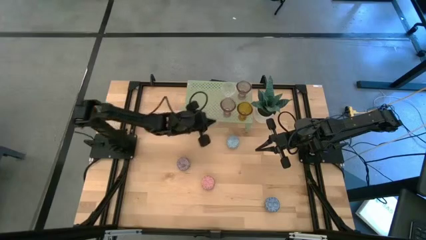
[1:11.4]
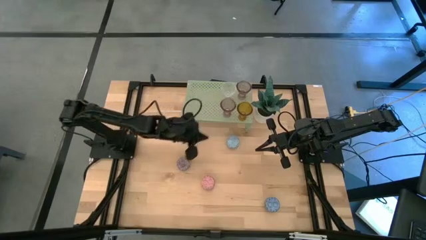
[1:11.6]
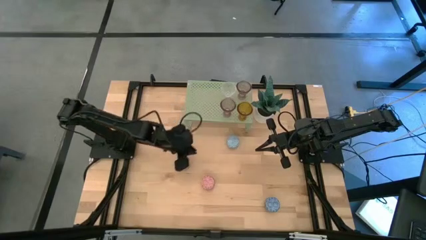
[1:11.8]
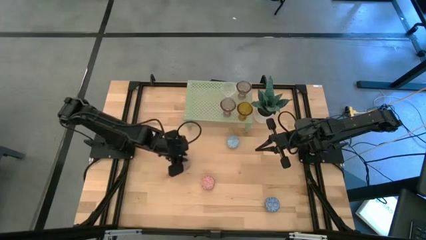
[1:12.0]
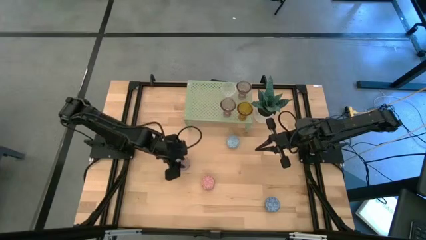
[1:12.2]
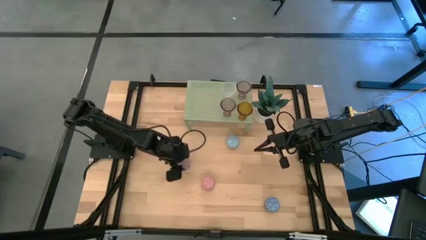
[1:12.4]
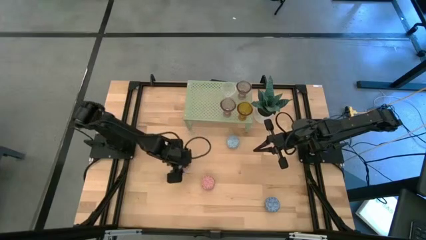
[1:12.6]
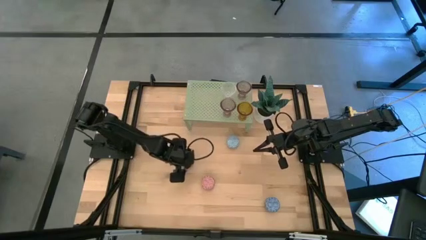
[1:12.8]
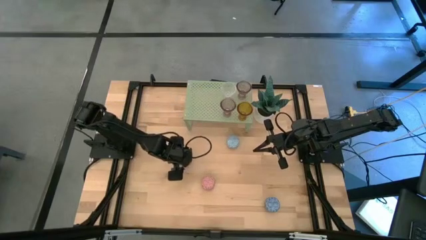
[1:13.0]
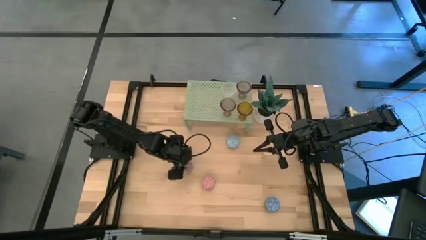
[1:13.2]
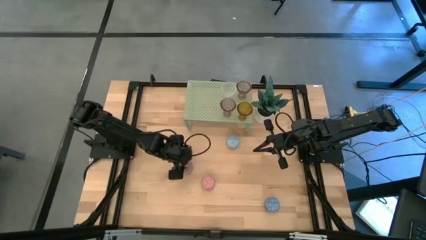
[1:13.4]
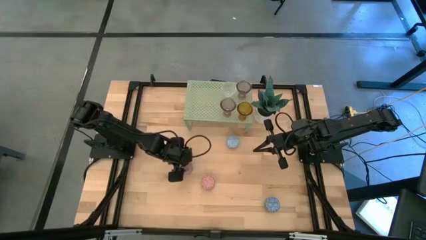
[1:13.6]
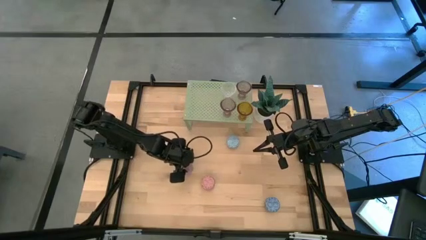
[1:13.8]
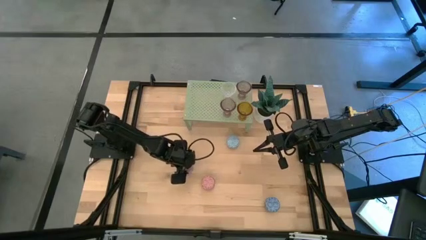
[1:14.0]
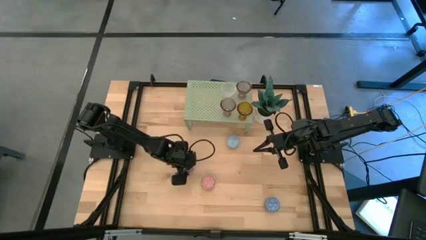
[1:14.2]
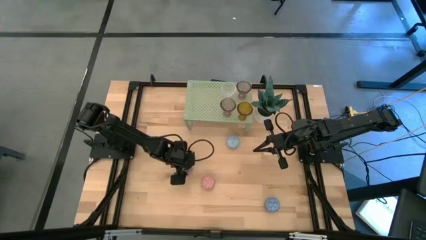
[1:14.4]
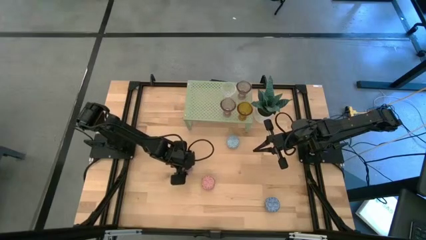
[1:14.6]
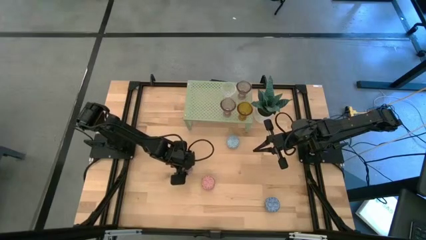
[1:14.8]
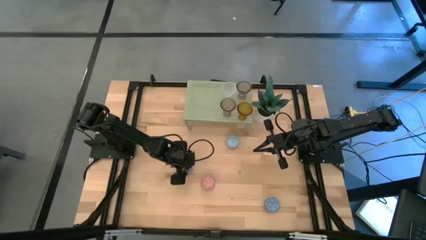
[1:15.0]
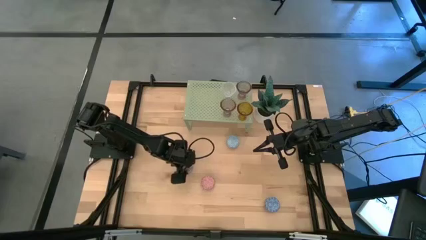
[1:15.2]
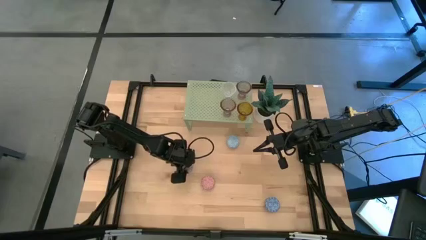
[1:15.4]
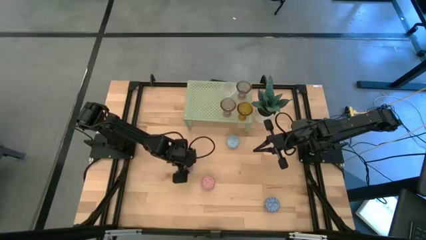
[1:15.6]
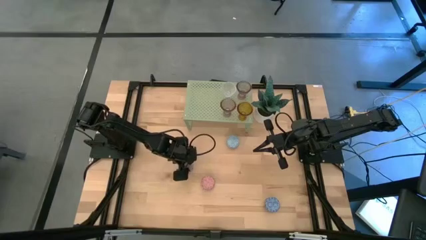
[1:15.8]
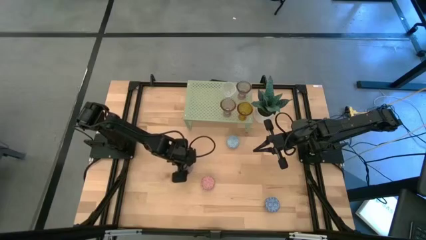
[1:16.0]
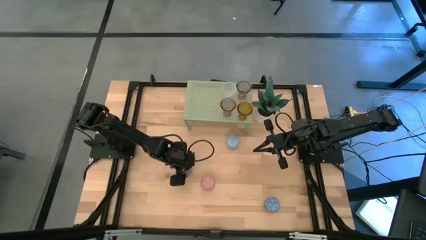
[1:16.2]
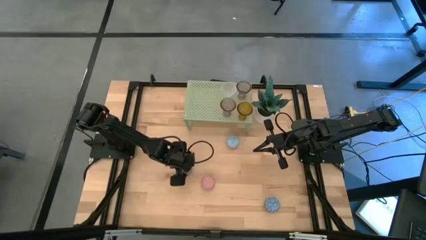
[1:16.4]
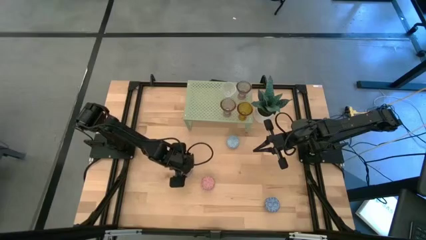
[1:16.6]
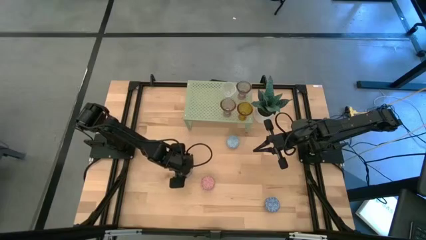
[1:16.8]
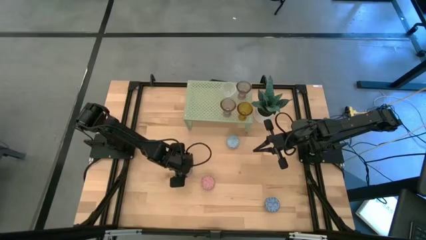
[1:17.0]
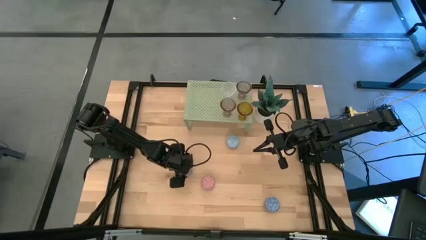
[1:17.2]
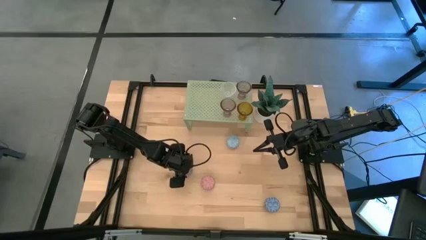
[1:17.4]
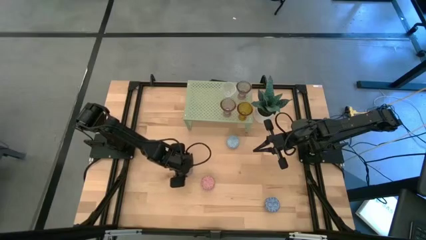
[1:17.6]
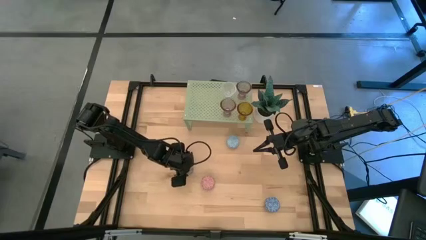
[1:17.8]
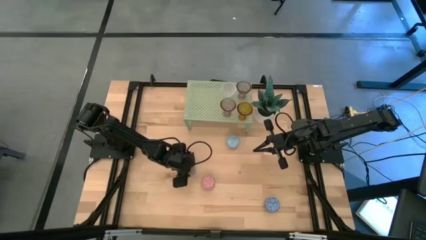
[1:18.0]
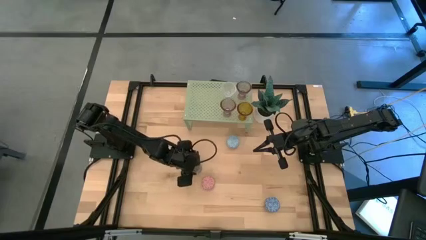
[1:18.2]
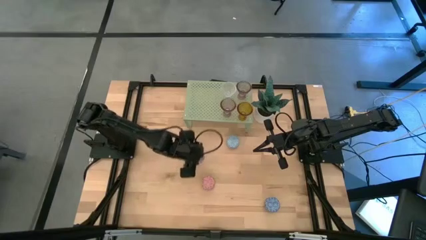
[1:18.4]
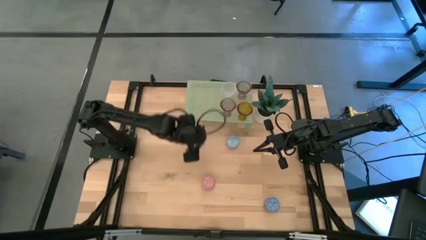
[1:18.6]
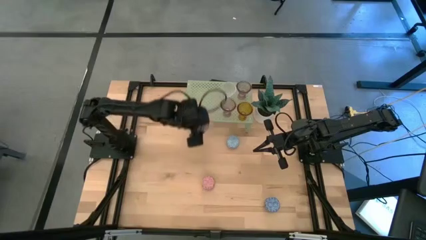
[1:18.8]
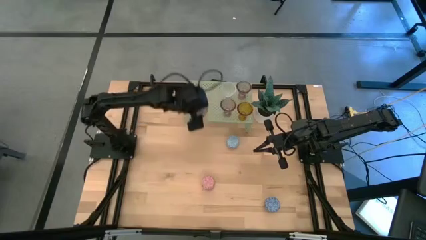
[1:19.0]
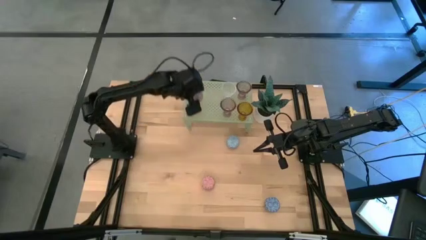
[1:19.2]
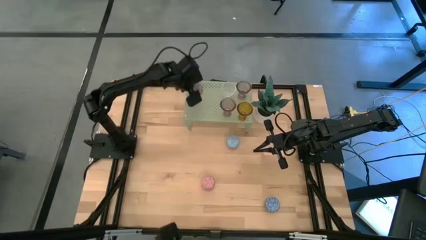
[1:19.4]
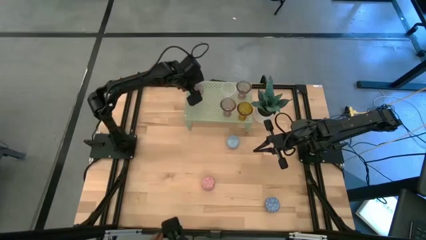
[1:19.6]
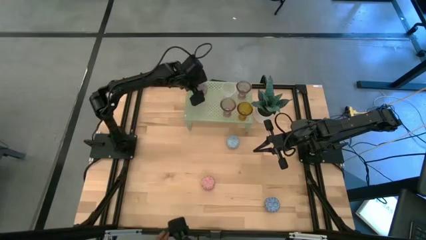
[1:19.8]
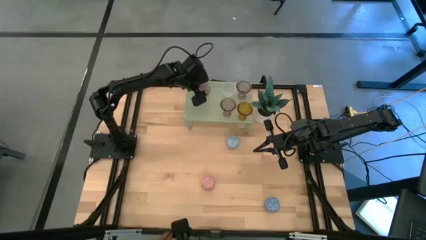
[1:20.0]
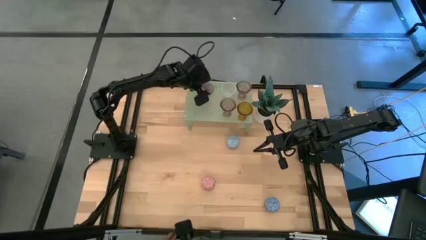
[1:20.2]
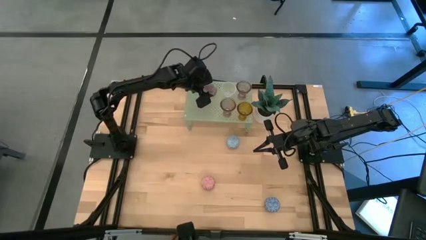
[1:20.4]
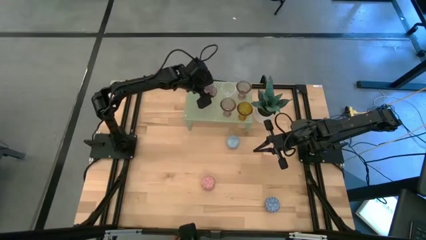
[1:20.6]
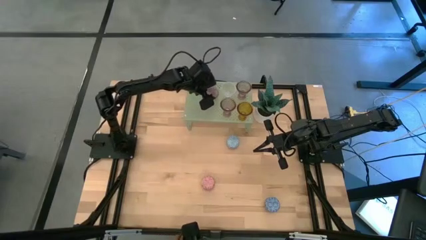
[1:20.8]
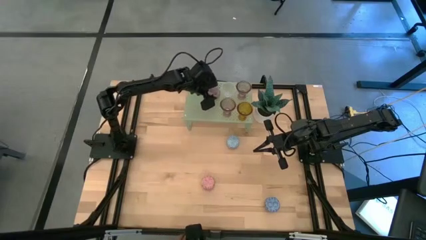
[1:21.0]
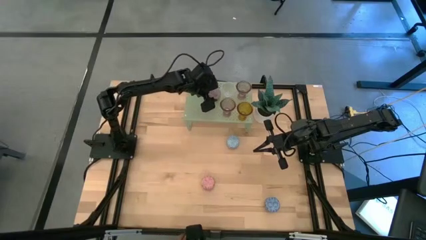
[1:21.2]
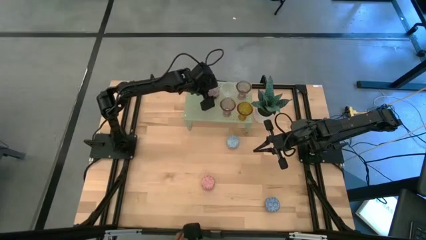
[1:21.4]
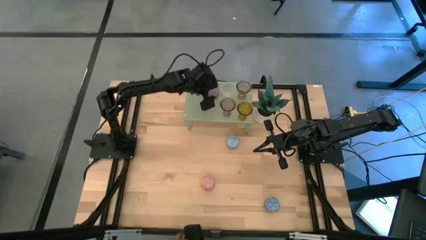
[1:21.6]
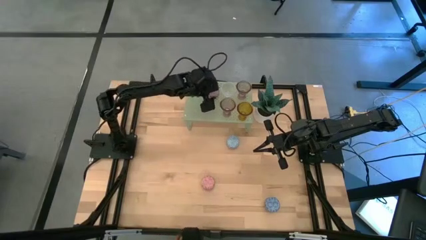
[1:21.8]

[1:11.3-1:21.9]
Task: Pick & Place candle stick holders
Put the purple scented candle on the shelf

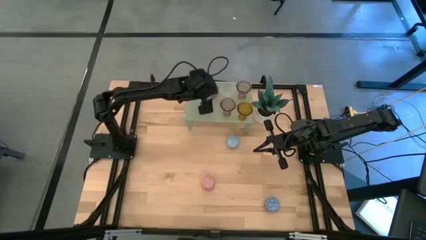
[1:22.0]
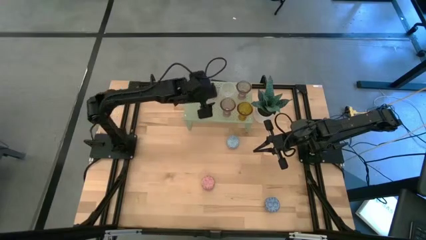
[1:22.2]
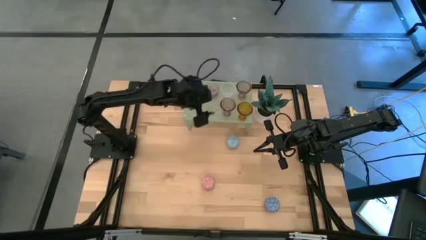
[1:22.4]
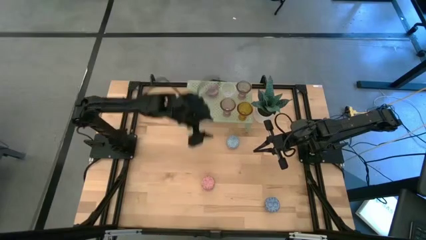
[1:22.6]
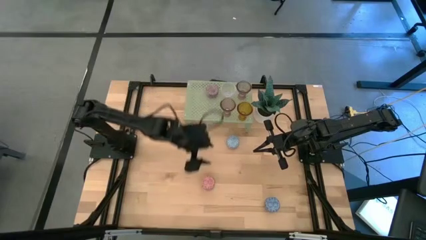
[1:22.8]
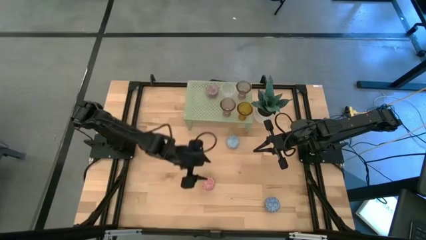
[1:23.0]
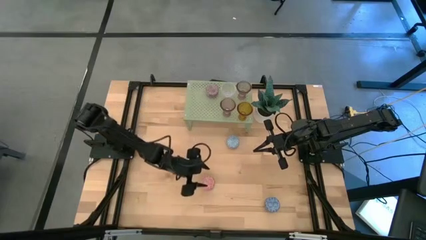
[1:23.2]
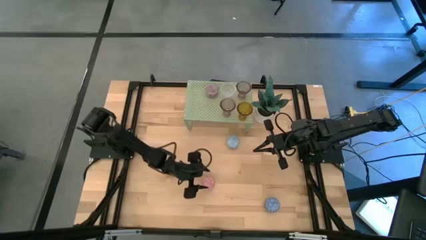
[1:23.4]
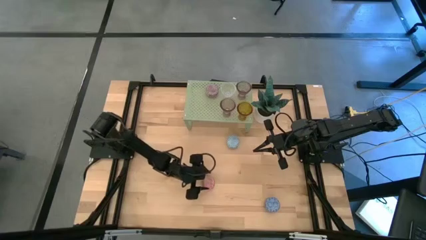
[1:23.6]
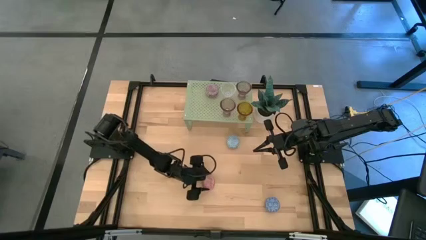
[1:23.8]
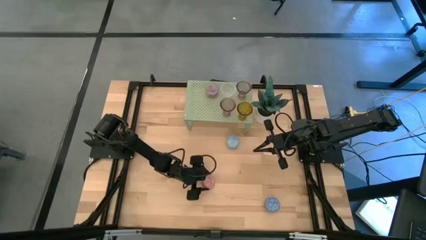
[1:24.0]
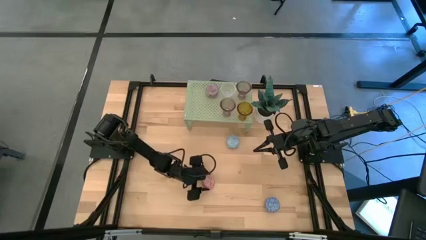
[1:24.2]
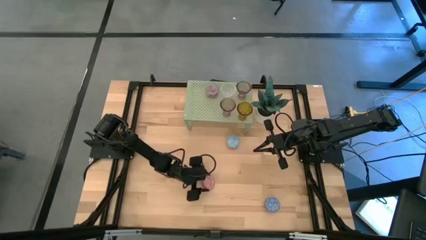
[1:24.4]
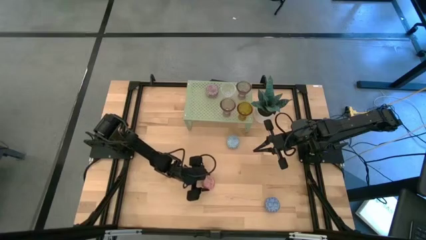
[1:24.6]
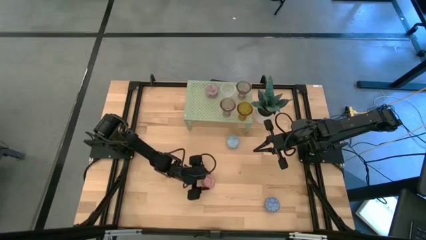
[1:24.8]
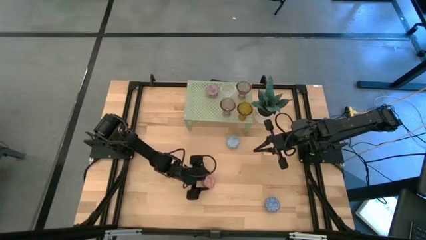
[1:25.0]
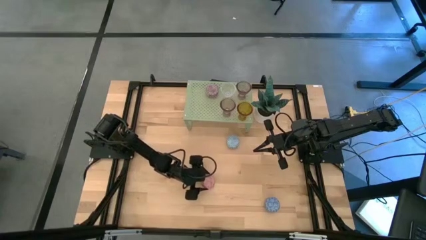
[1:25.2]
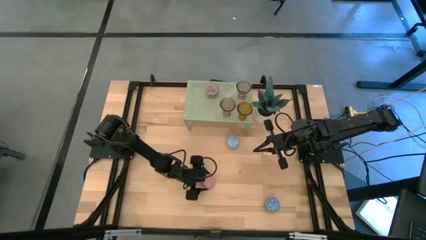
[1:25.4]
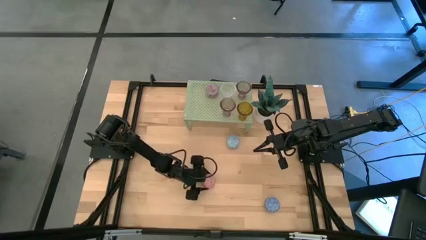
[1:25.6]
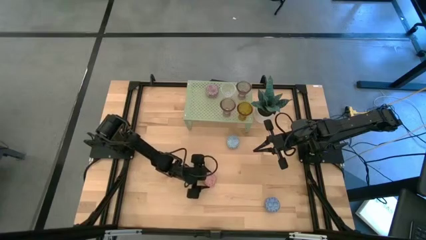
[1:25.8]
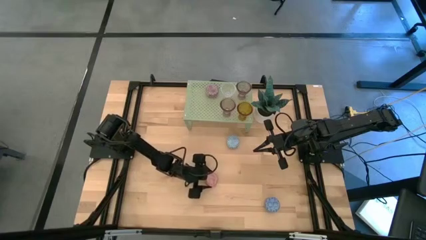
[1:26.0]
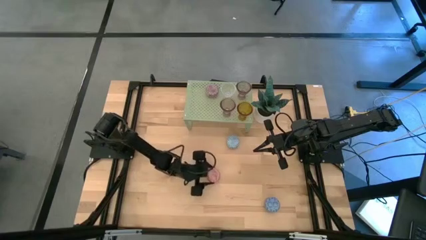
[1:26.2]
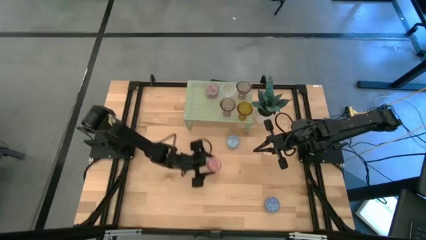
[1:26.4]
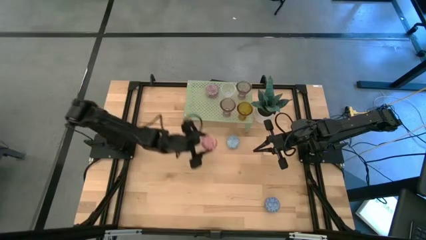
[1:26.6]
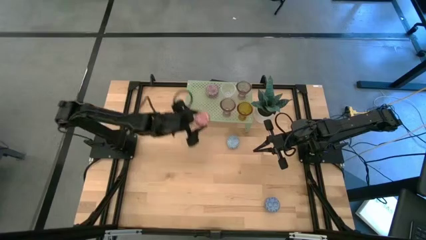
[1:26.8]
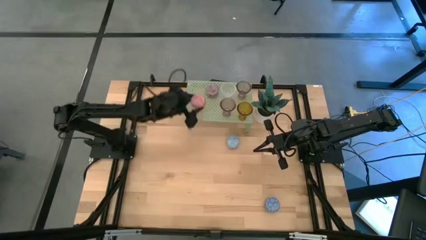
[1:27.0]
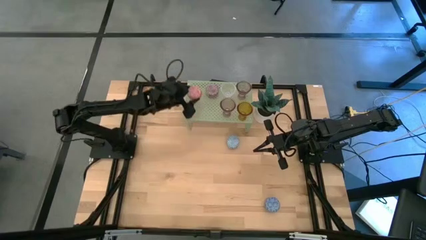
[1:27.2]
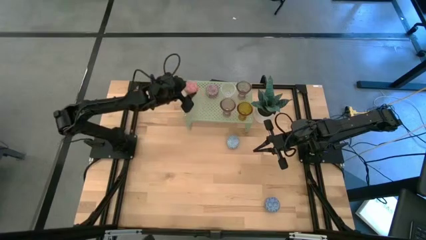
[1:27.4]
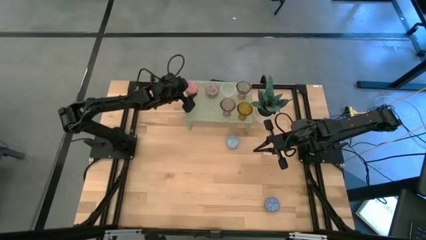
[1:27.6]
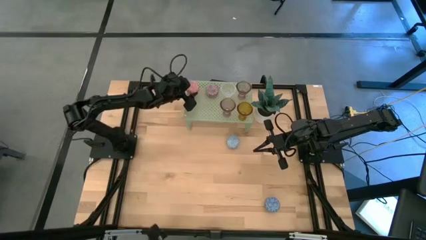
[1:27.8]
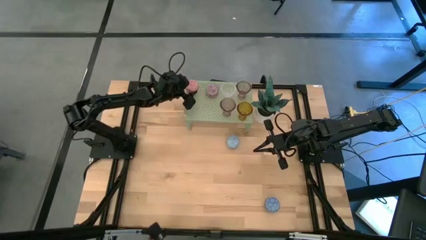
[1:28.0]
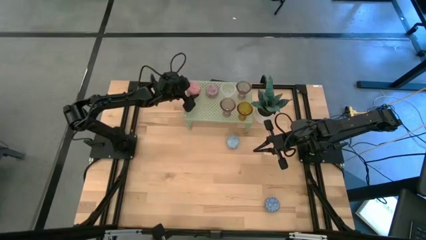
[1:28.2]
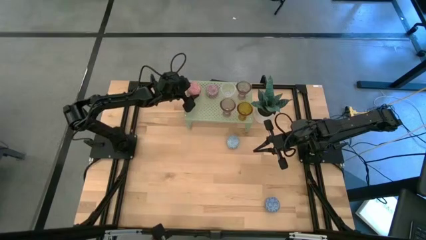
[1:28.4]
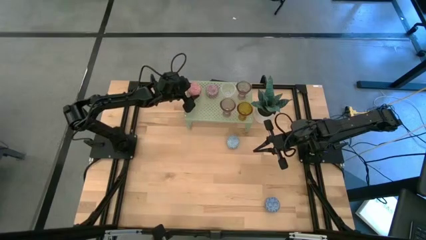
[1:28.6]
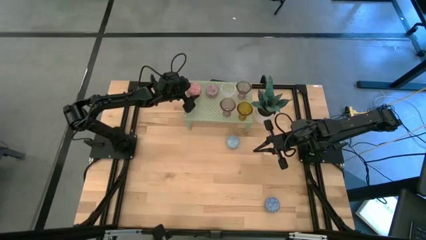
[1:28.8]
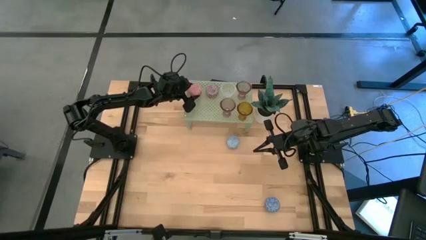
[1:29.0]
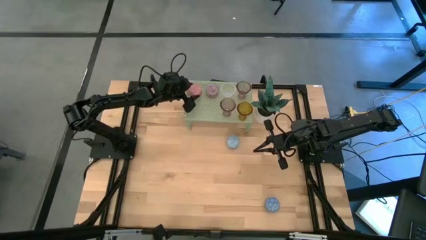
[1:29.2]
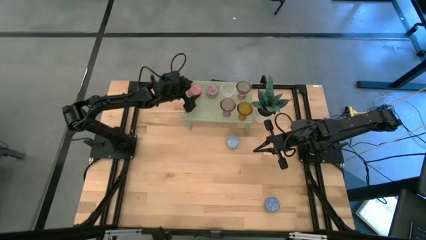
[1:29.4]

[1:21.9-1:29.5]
Put the red scented candle on the shelf
